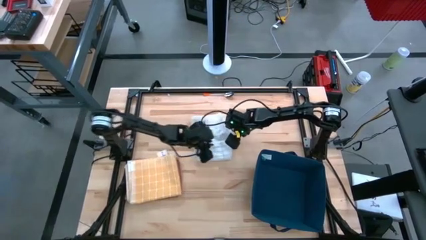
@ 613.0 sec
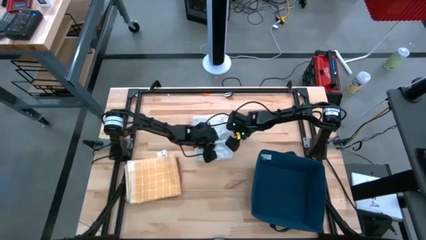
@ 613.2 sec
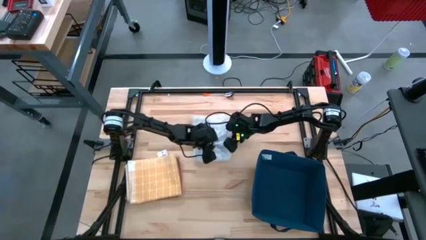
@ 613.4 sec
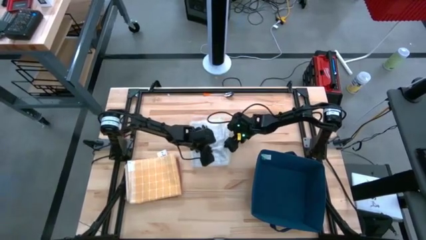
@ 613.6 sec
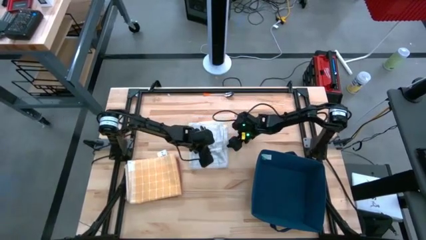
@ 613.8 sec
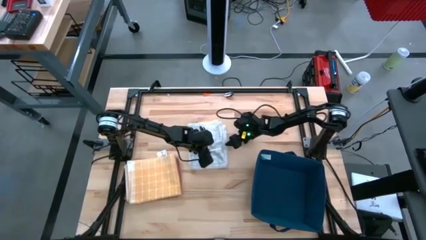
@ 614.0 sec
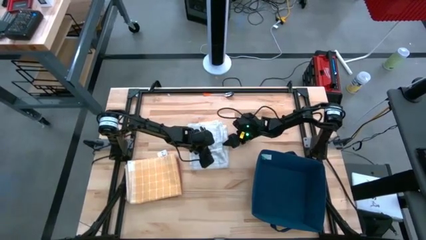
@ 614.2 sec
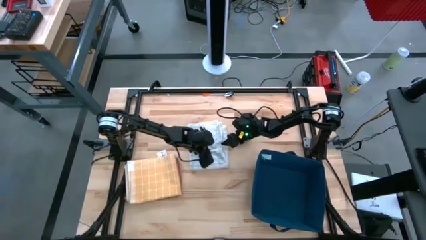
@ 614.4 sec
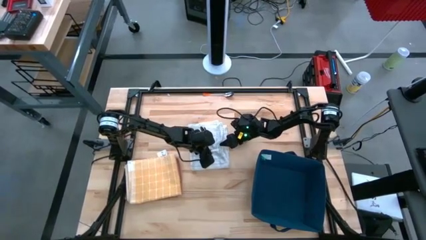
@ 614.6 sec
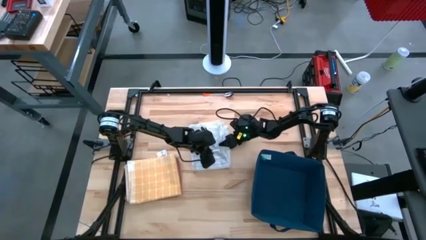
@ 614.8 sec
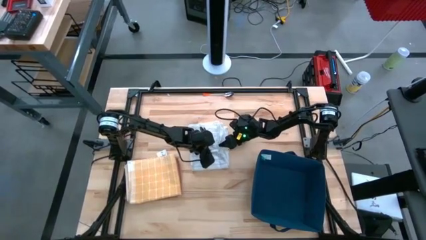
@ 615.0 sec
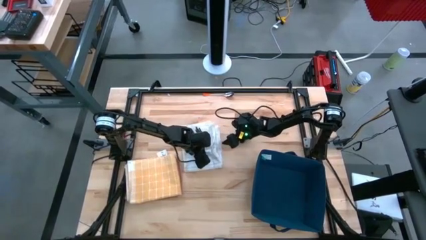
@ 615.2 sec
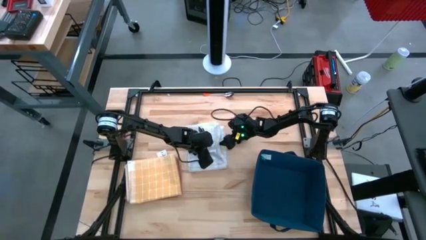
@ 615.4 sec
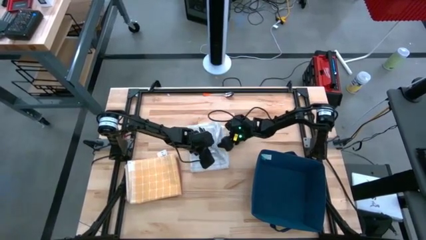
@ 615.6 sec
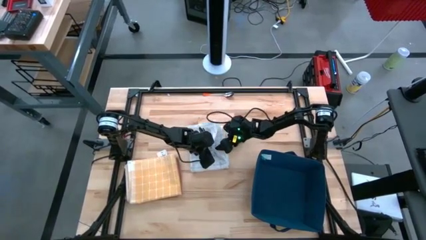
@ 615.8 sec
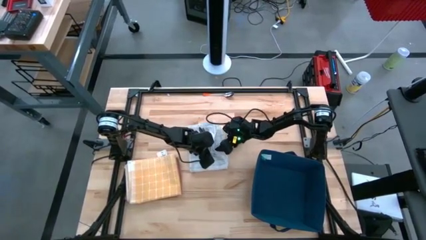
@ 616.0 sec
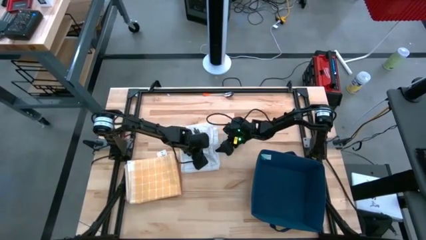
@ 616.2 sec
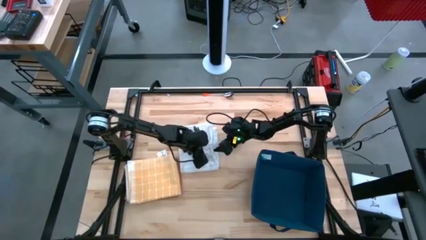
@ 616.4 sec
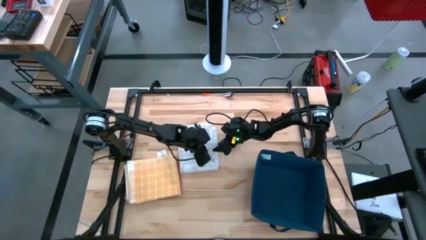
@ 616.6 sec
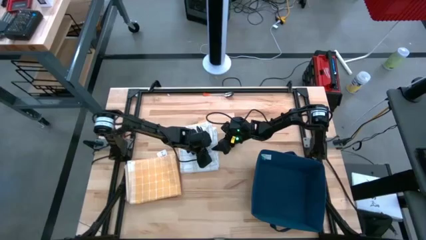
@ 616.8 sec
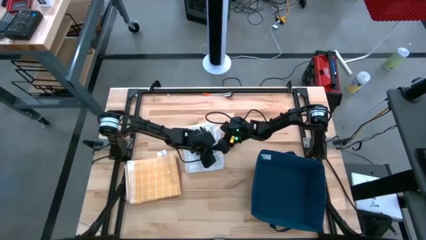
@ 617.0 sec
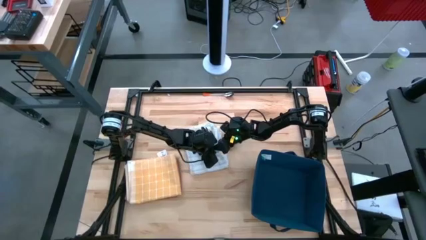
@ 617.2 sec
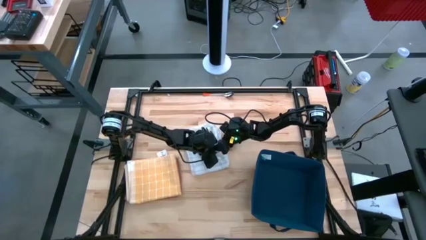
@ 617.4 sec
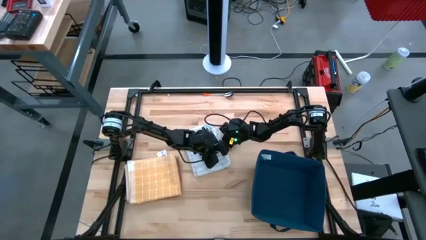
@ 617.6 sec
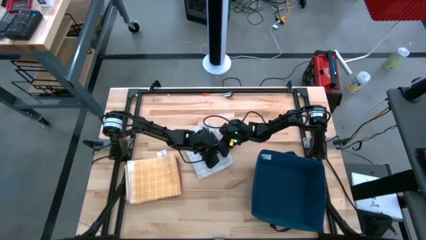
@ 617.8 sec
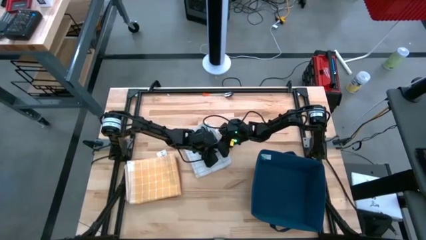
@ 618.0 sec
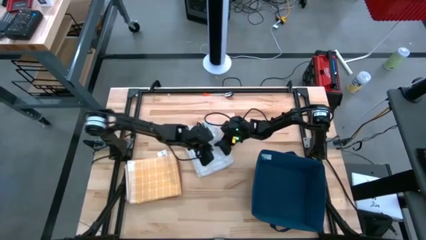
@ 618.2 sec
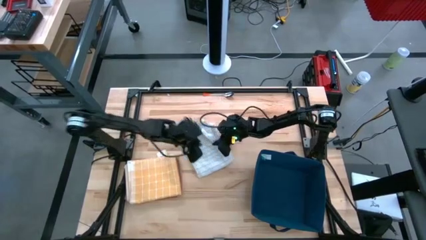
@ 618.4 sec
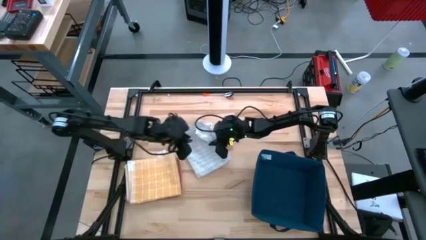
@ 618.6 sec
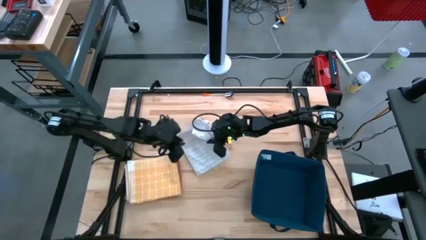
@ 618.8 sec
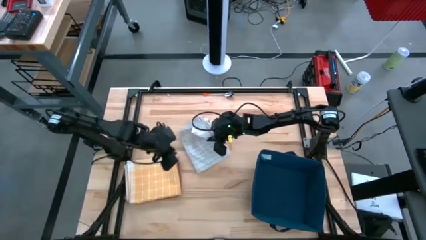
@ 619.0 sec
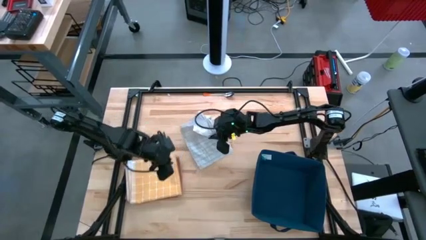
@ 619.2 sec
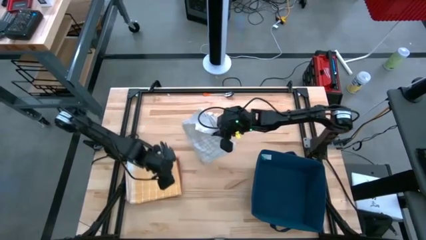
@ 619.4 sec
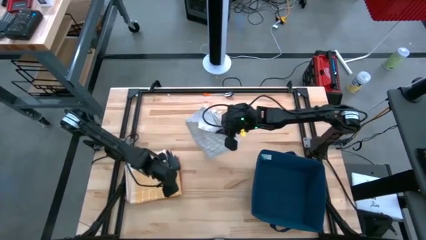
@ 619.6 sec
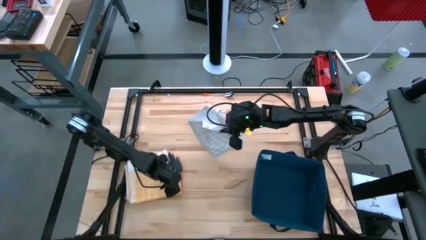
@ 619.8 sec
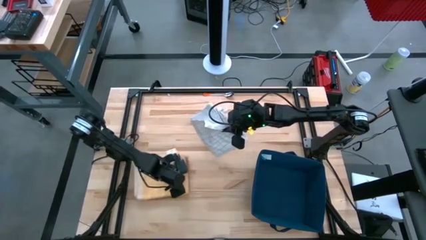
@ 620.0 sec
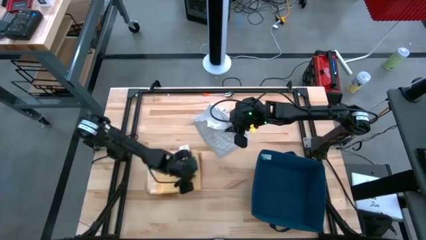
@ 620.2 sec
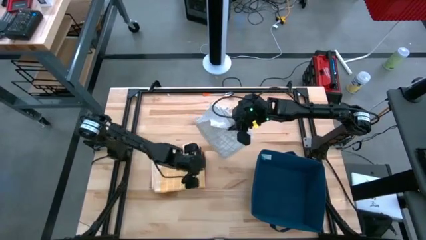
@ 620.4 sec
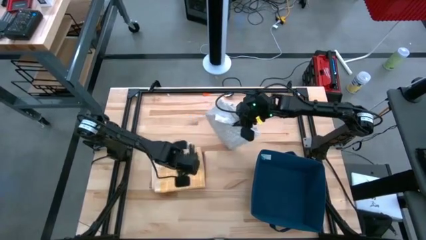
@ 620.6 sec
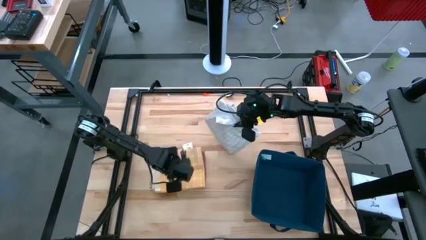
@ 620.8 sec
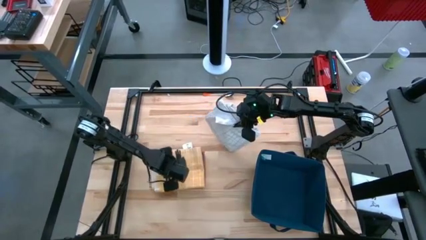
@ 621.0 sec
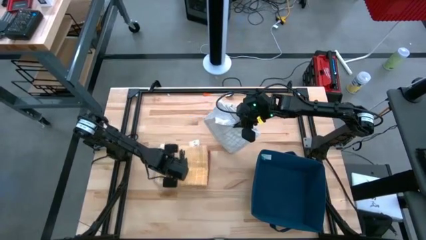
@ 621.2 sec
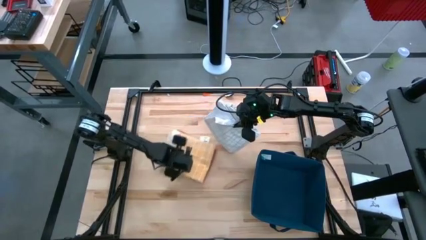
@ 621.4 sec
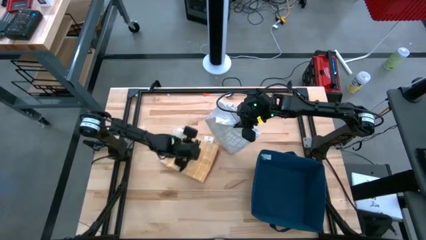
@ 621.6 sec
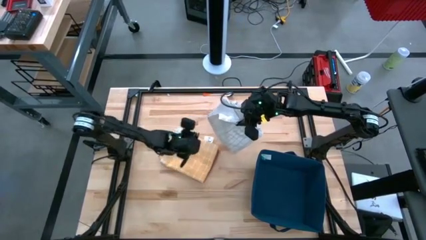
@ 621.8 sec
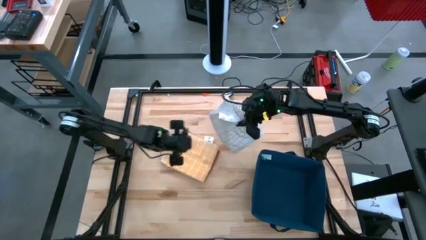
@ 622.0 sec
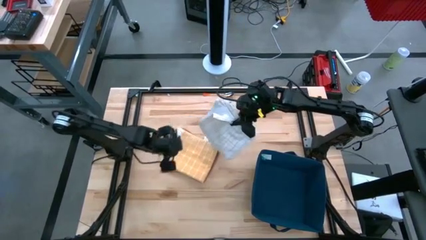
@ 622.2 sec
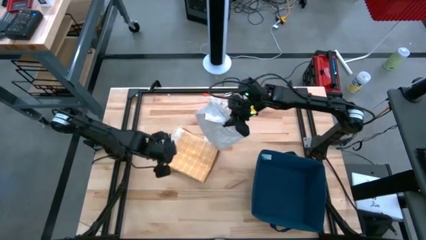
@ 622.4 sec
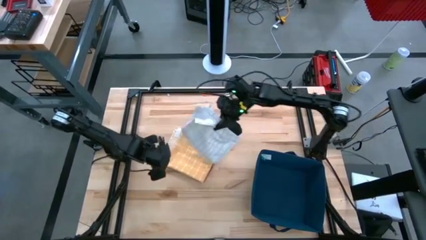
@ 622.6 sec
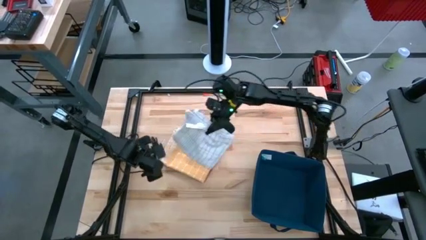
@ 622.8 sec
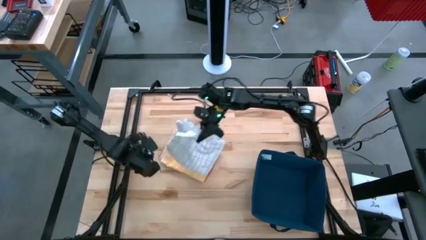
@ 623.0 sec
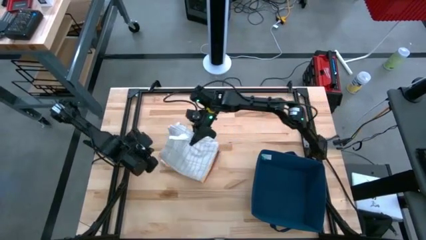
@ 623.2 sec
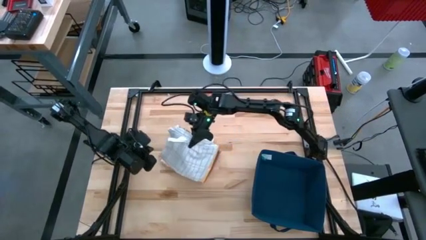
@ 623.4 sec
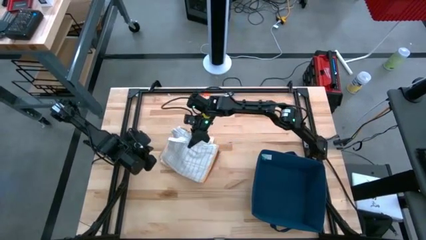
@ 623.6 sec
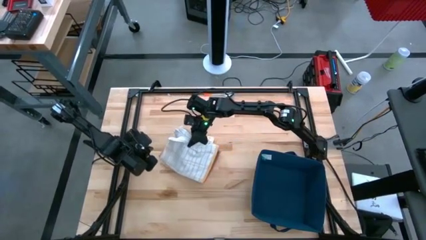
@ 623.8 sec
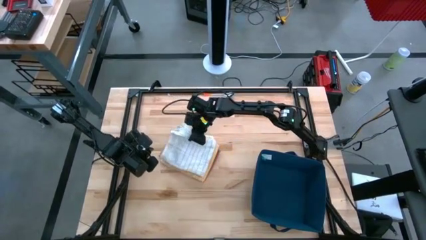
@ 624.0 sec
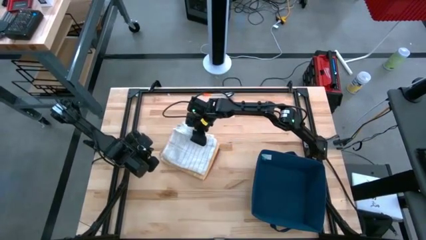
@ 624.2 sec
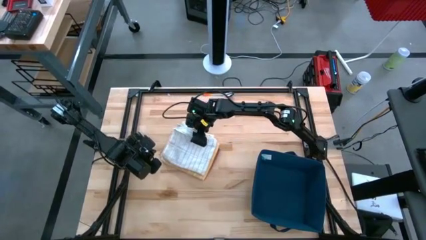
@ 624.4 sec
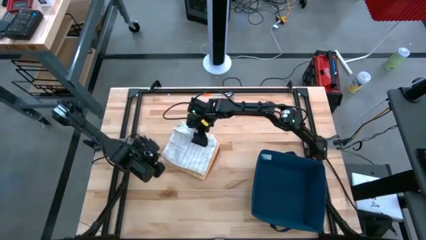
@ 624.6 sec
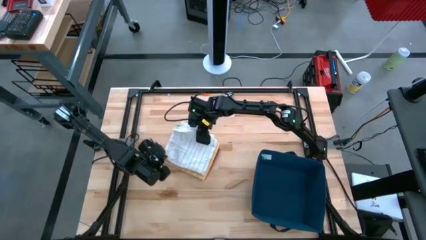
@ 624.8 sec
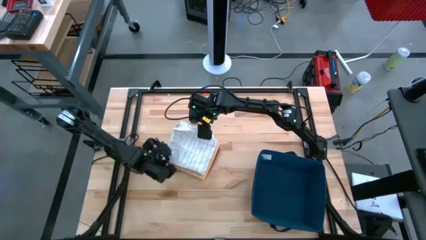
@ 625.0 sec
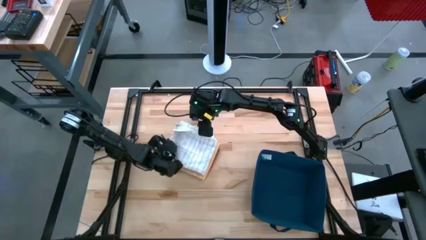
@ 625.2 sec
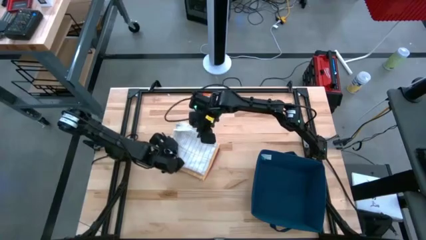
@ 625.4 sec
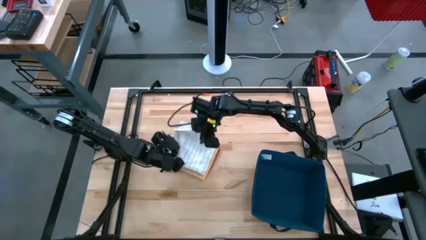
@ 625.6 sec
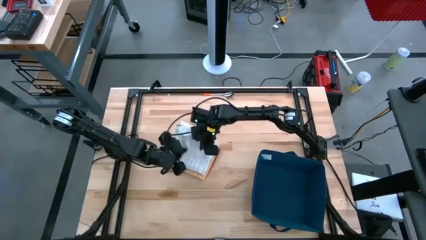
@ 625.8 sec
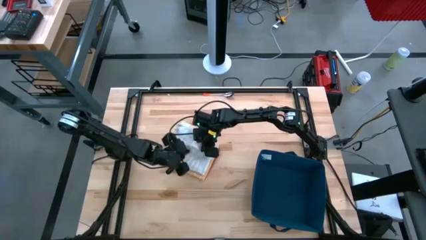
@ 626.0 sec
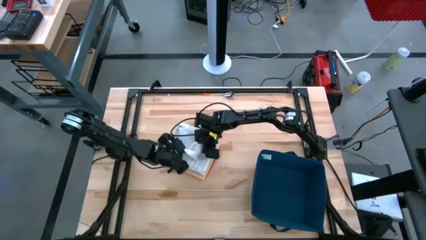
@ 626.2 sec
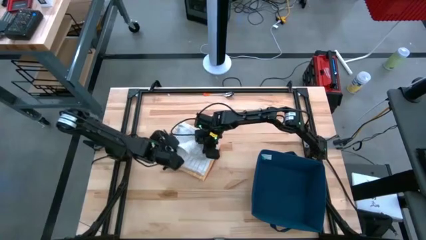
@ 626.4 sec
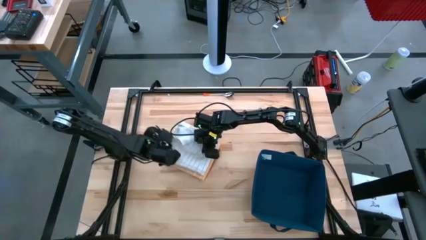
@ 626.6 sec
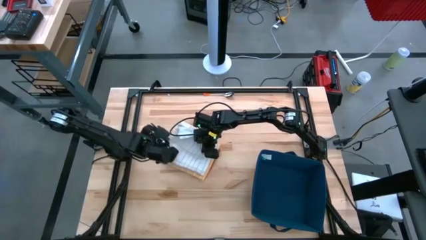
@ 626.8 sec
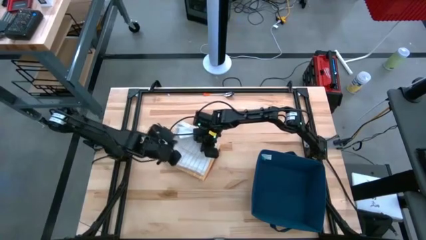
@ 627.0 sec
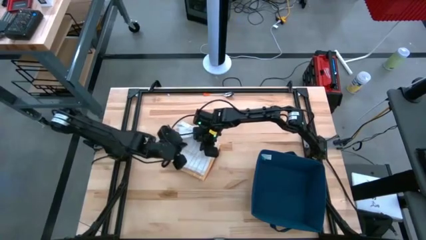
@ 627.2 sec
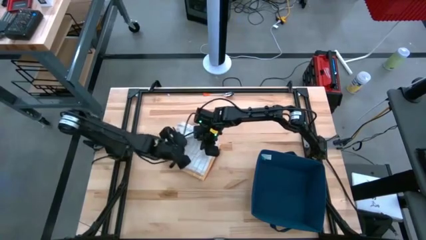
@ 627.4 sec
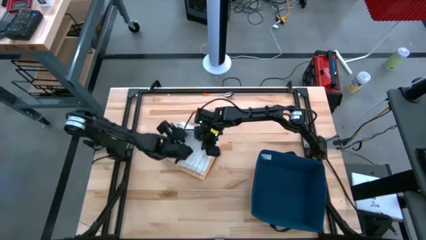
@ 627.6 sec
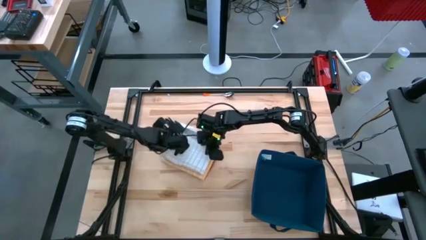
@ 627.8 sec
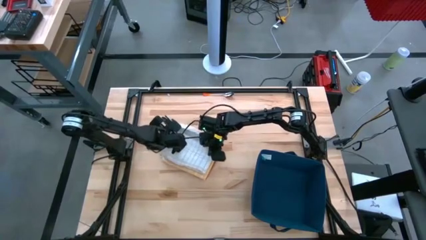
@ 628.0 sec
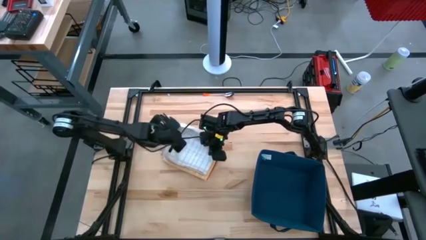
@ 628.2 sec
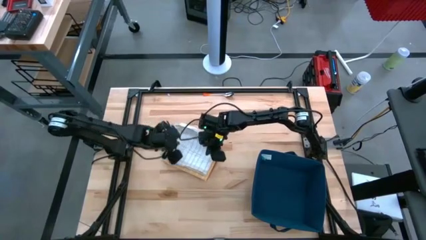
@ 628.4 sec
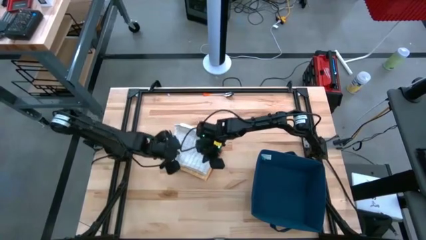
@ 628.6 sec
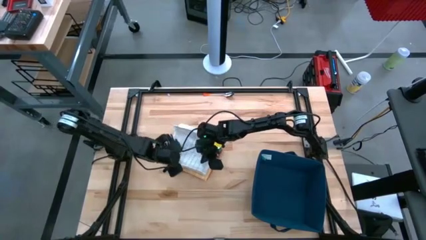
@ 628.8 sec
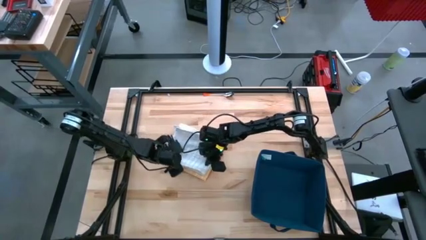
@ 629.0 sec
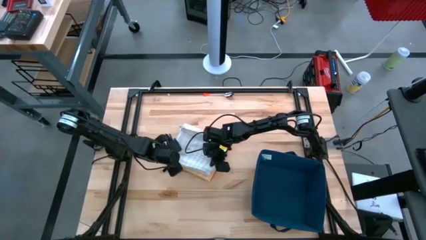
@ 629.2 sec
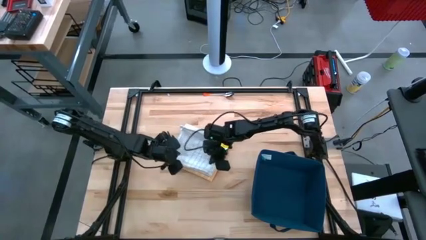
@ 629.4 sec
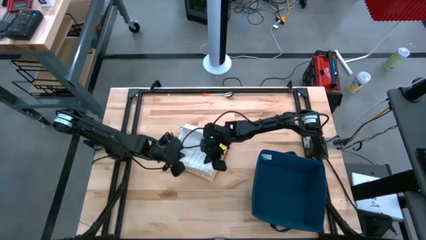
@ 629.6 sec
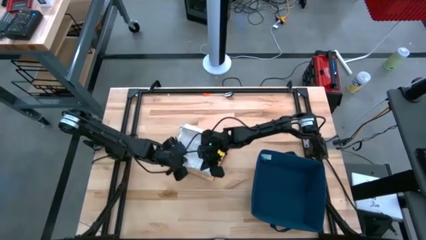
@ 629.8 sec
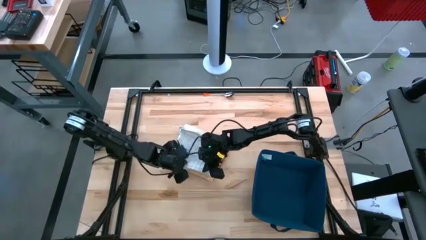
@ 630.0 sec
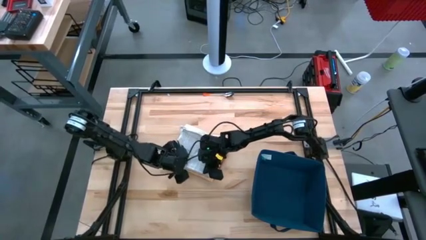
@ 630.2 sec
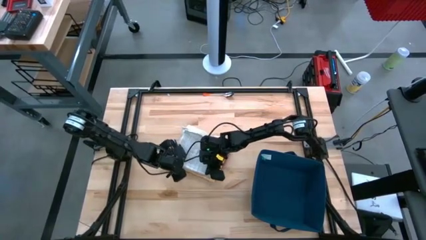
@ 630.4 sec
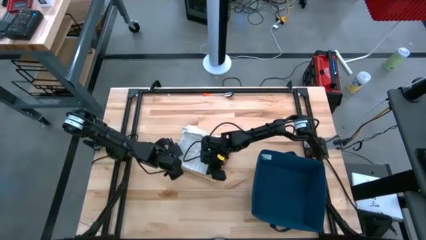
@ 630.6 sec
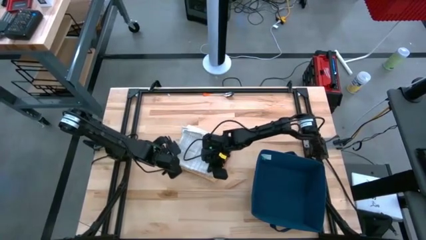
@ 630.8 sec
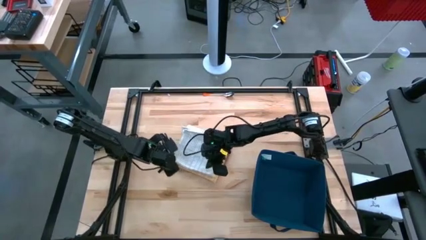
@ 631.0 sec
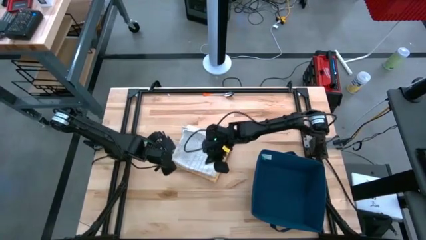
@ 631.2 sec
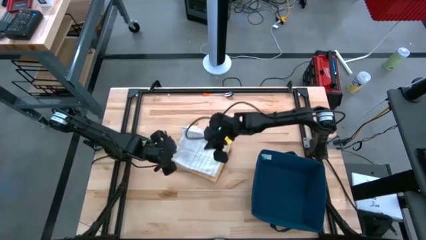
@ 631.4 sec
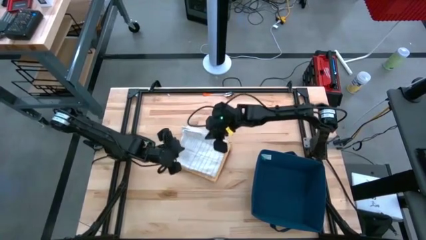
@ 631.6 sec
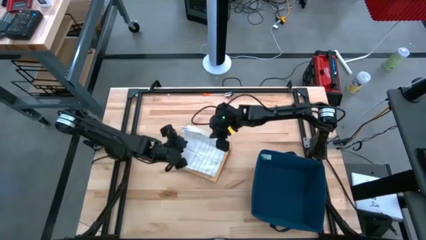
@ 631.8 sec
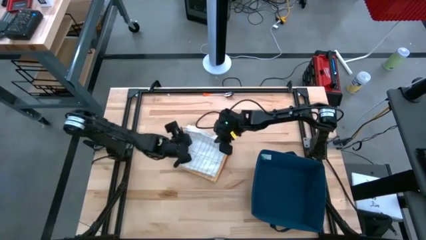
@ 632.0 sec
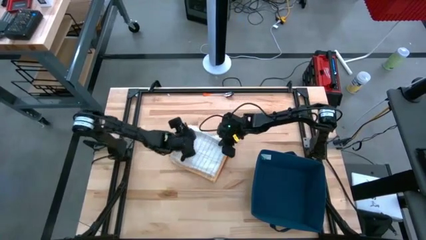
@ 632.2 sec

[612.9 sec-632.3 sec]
Task: Fold towel
Stack the folded white towel on top of the folded yellow towel
